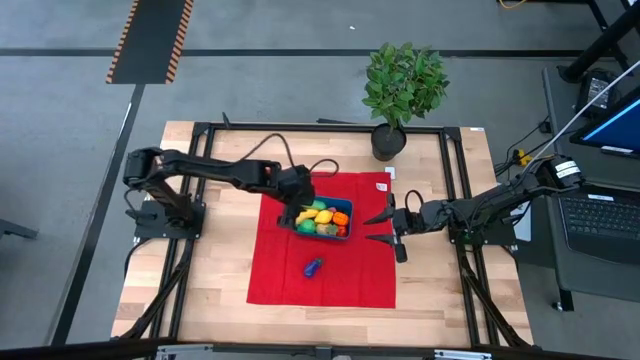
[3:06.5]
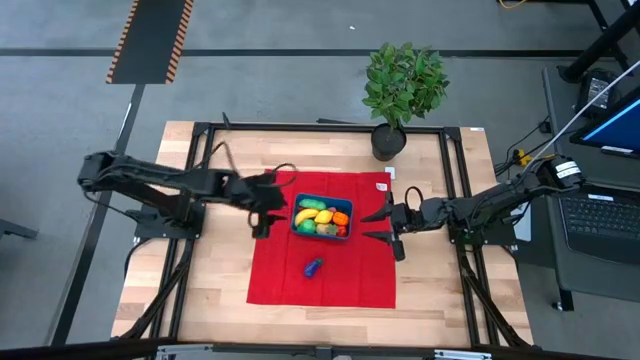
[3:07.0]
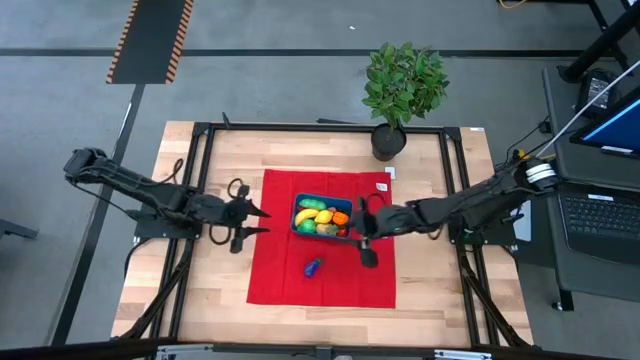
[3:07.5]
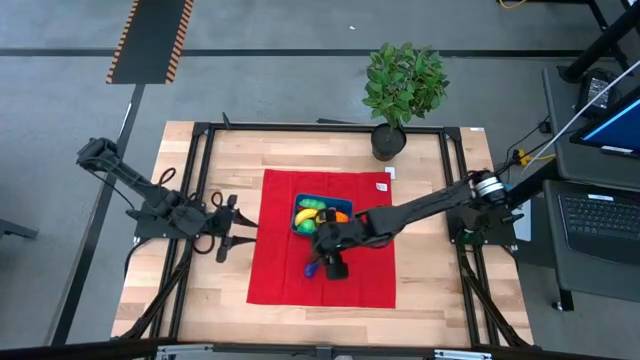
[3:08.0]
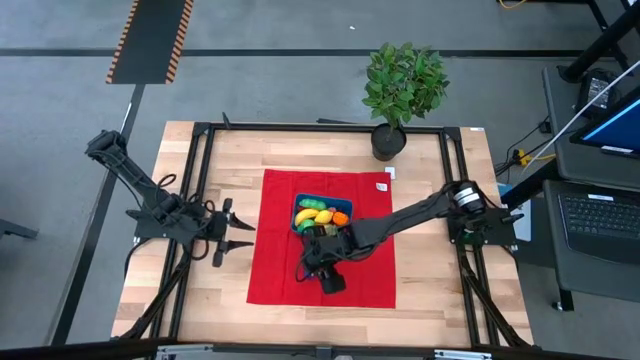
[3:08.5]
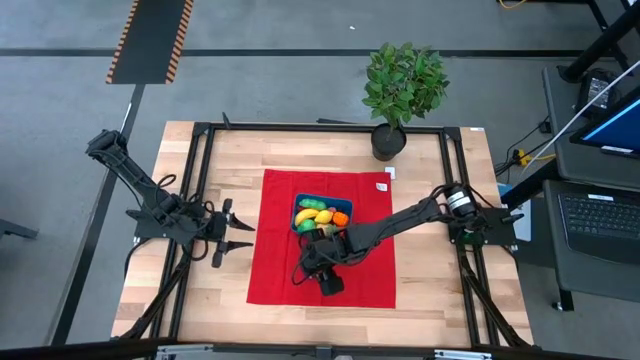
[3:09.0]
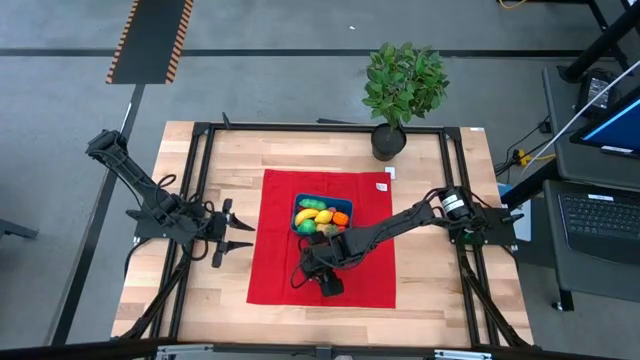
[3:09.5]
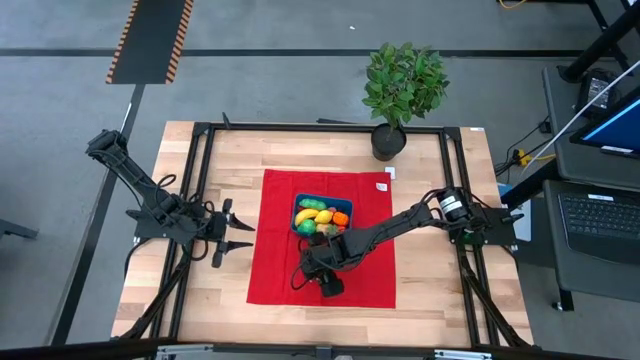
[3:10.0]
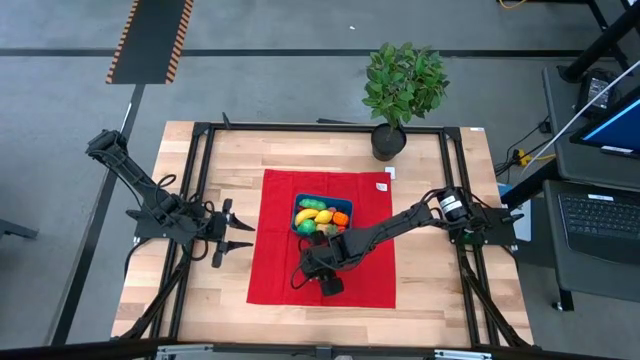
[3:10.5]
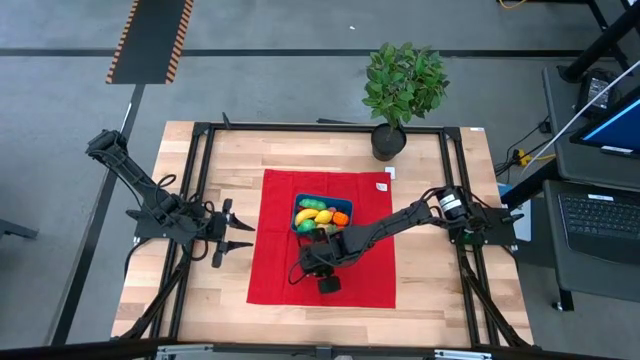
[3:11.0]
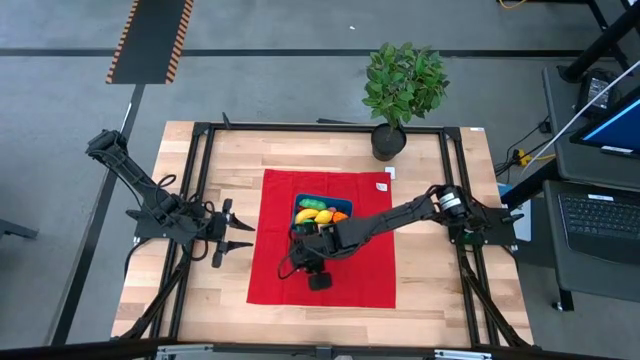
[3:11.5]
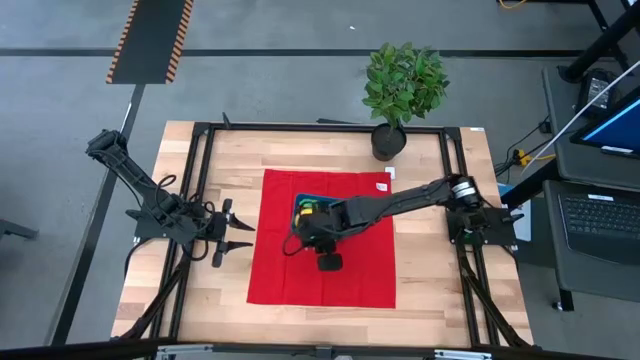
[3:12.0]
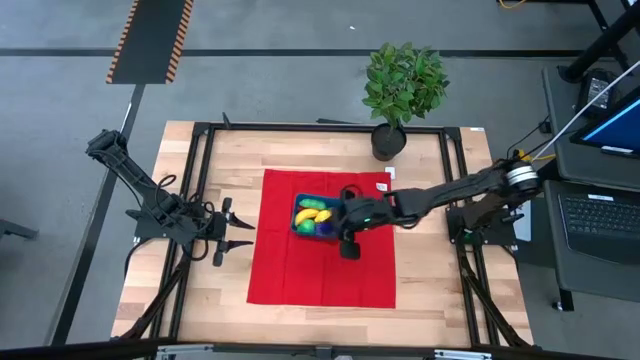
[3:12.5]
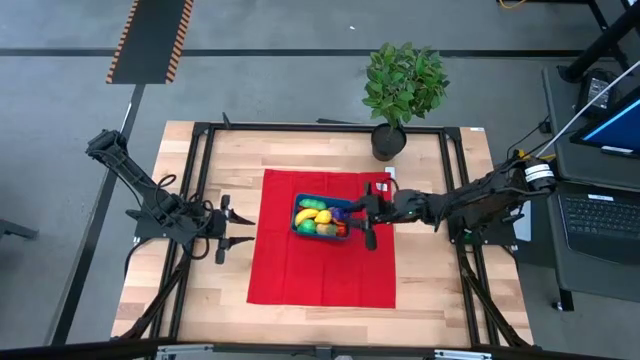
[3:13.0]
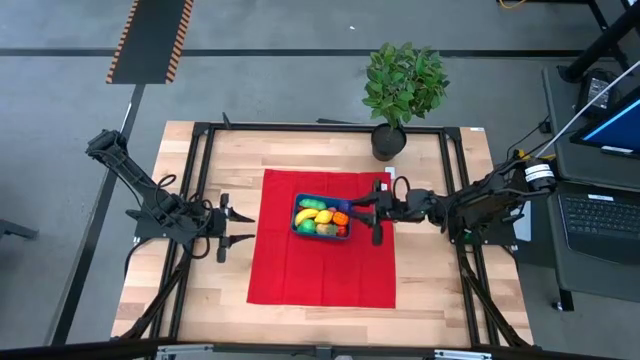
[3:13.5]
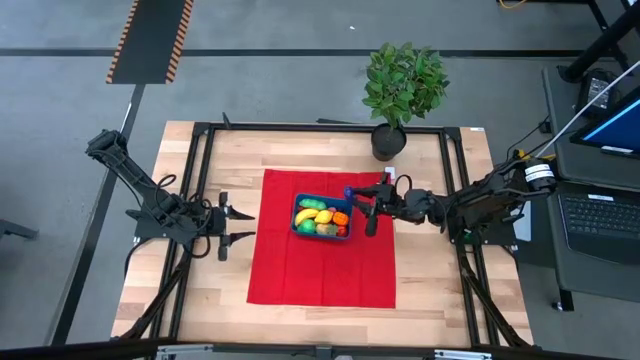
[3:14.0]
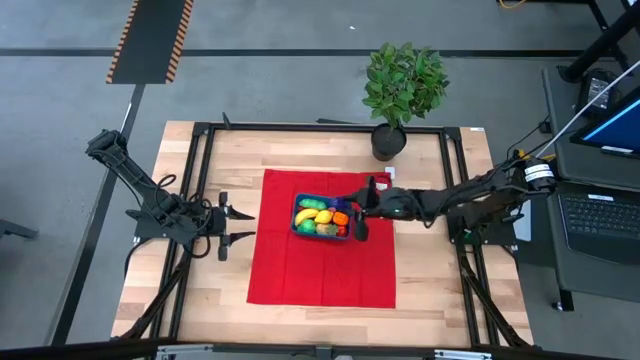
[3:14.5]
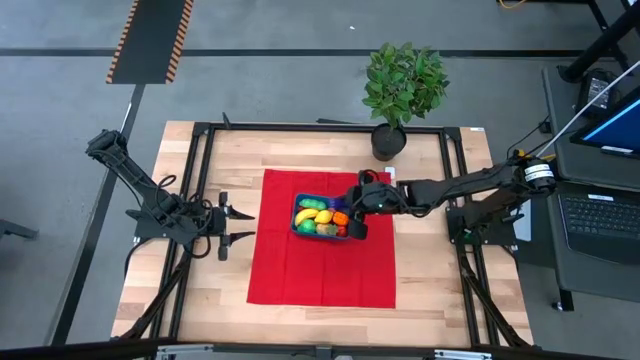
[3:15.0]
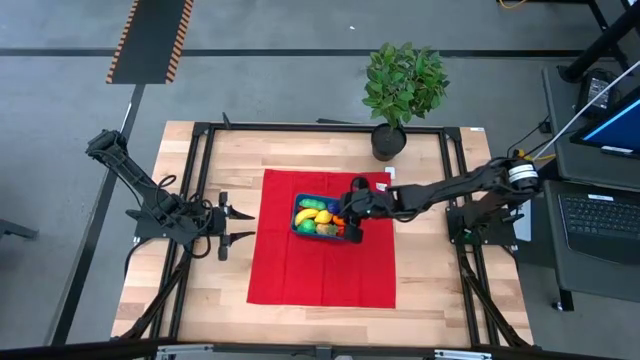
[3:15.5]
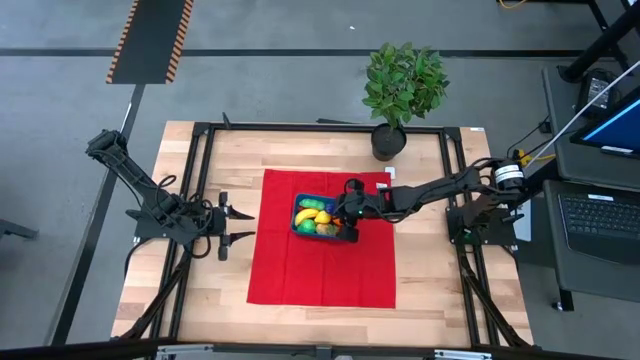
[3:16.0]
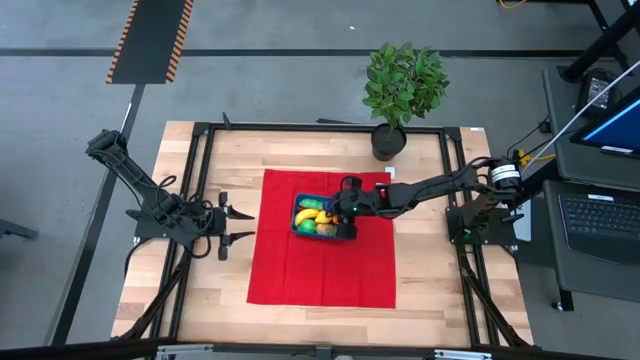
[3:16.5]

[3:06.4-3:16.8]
Task: Pick and placing Produce into tupperware
Put the purple eggplant into the blue bin

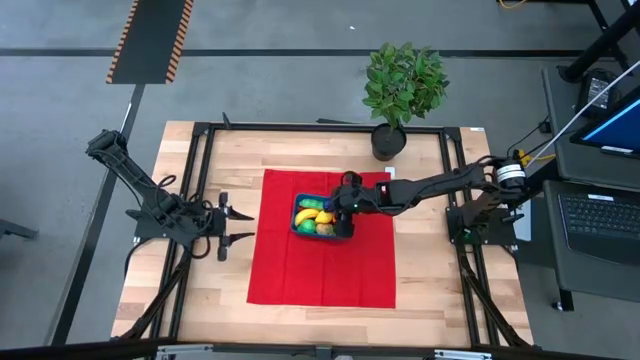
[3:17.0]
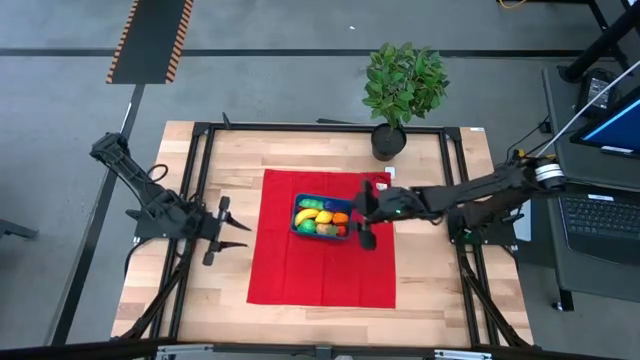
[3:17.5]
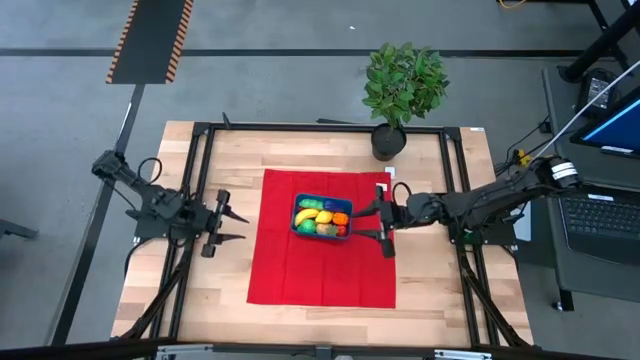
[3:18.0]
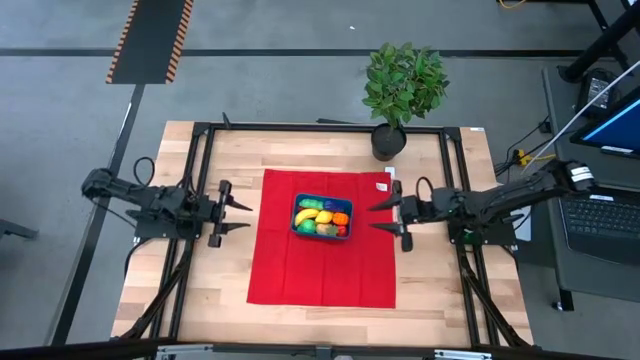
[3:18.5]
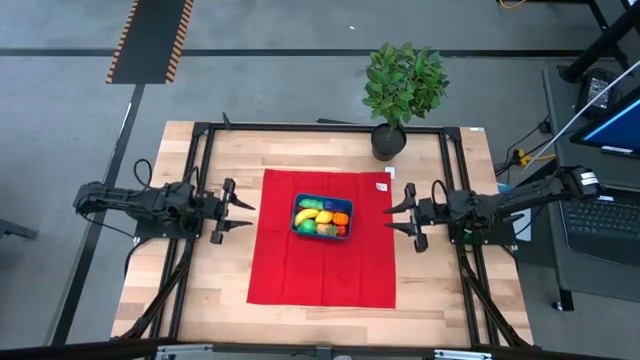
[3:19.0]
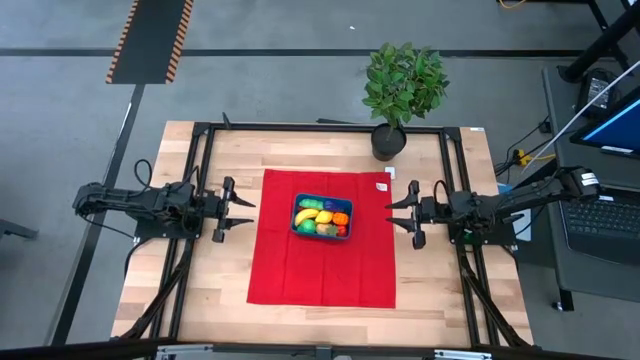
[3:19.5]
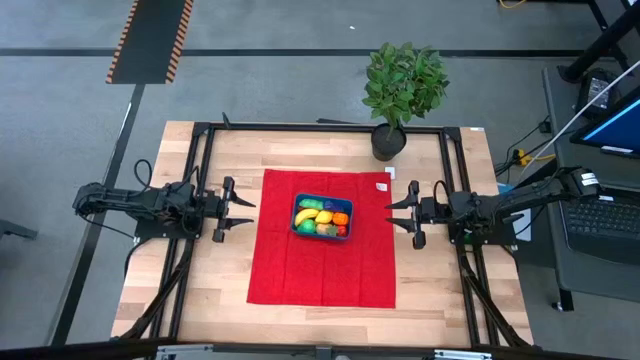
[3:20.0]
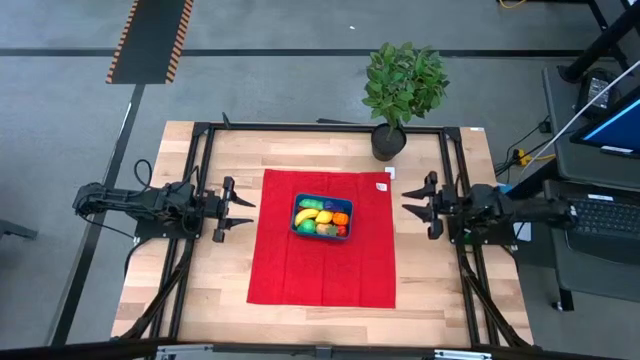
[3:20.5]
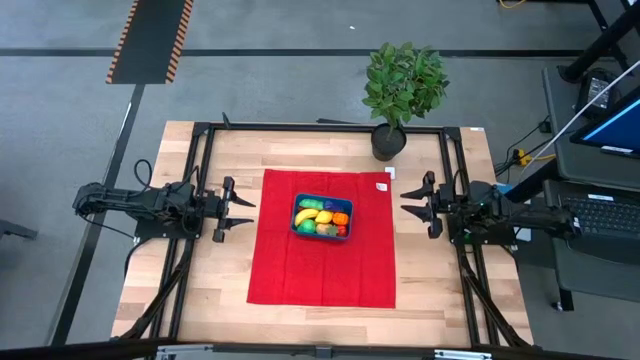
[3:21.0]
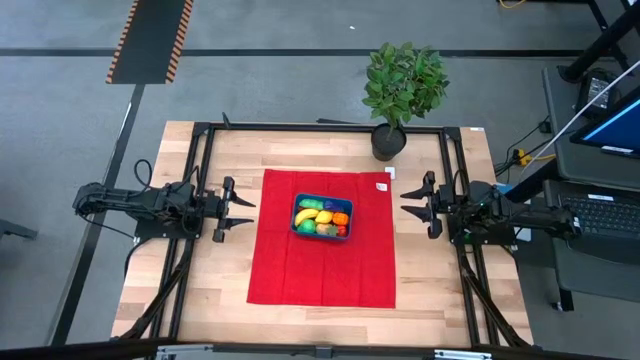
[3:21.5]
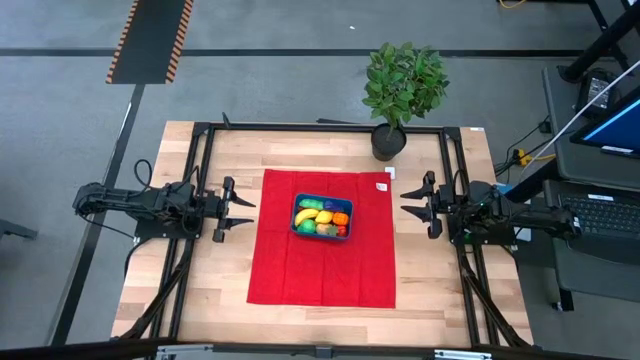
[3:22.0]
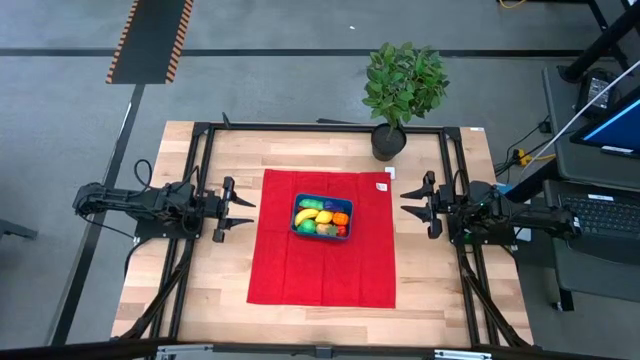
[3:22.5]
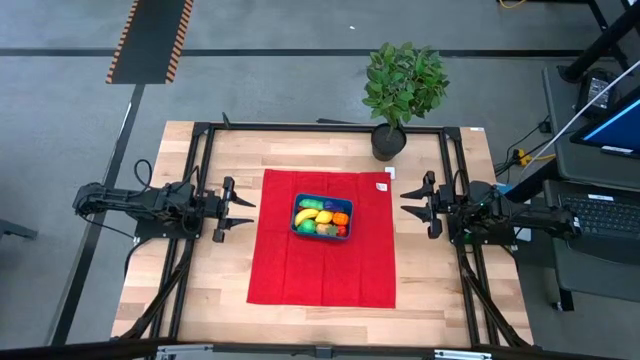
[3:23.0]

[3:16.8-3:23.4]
Return to Home Position

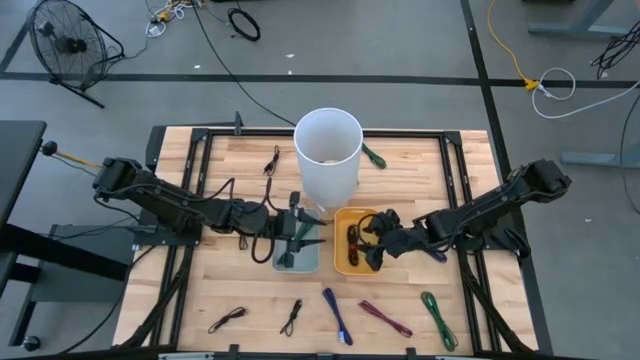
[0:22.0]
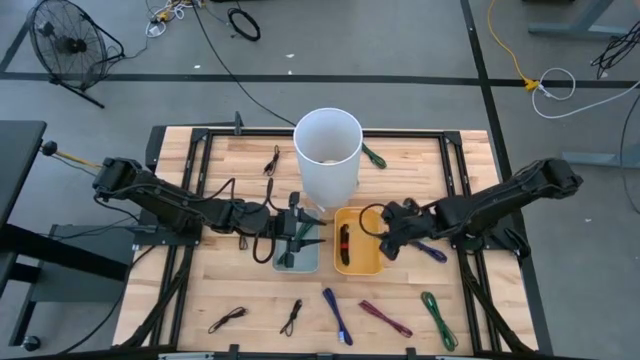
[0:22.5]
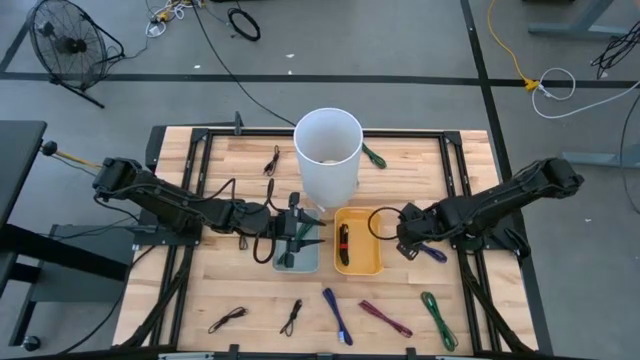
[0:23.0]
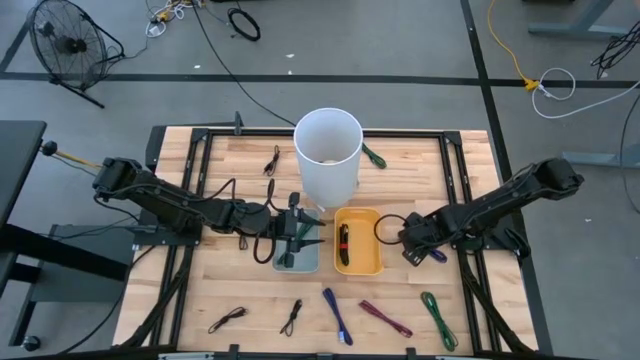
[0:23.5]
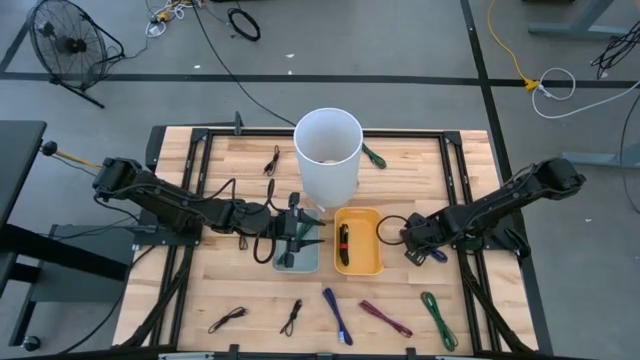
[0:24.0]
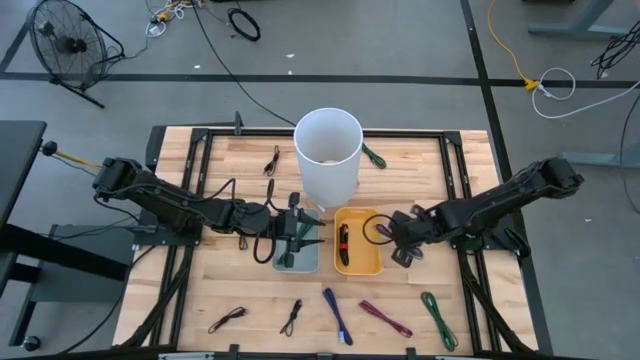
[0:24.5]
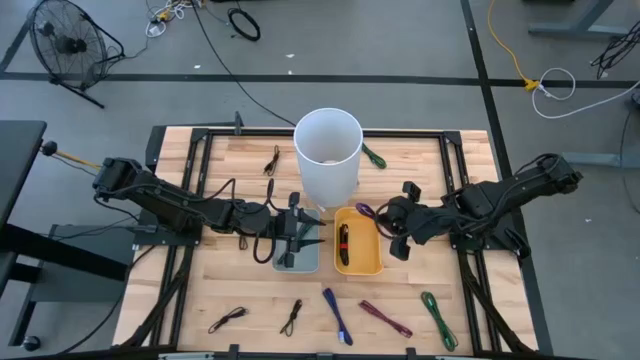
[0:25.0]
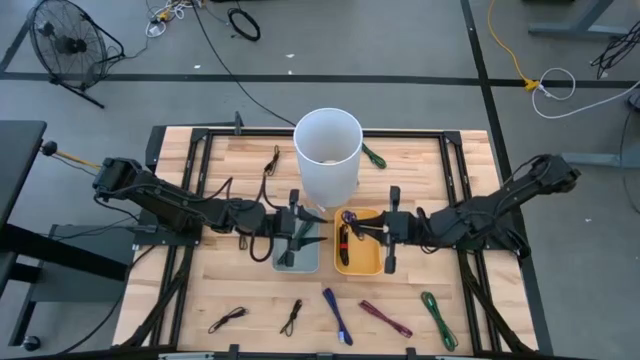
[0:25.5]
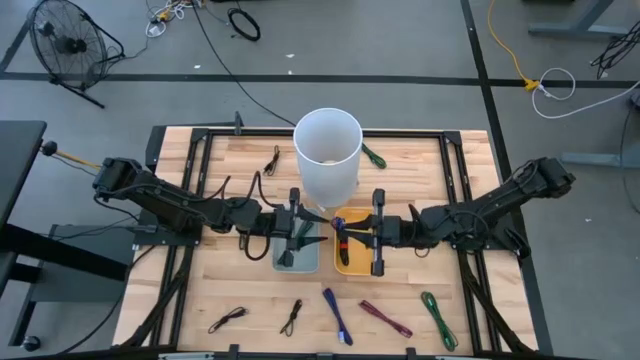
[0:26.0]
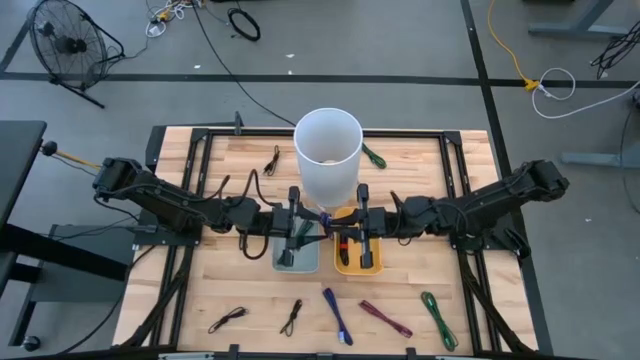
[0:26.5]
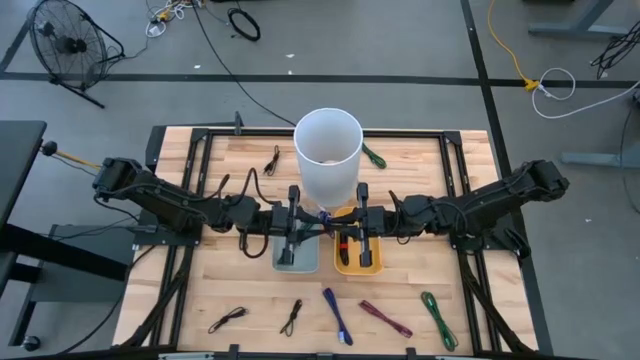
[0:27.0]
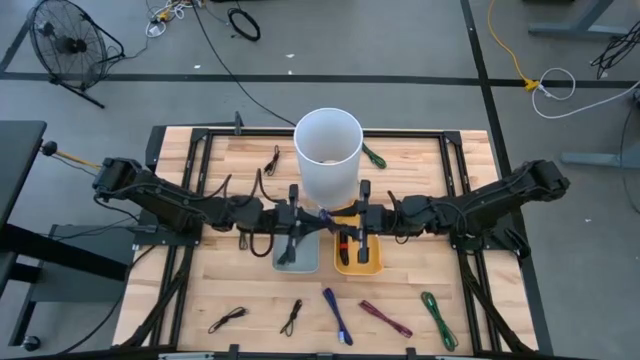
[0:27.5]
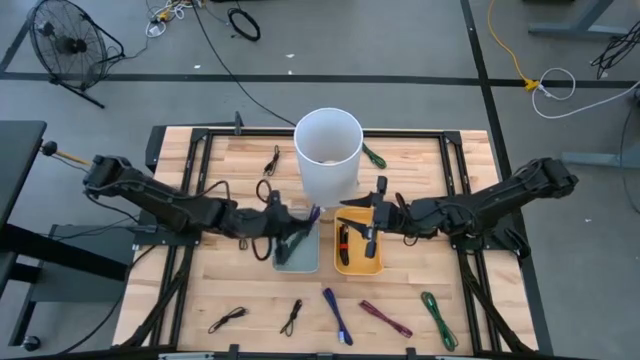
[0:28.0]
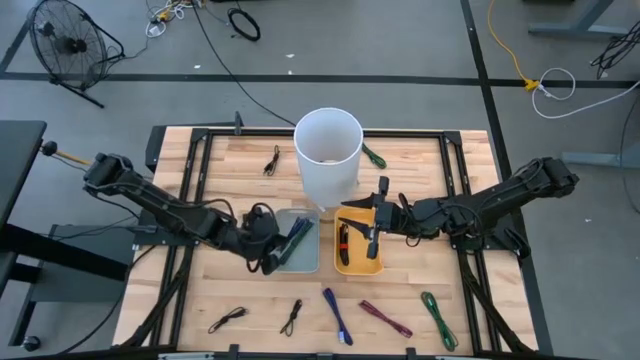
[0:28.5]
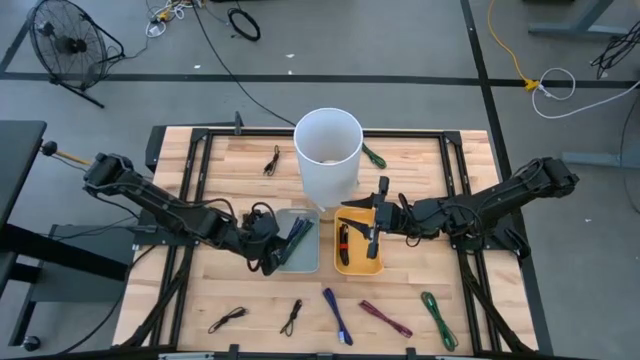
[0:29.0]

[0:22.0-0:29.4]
Task: Pick & Place USB Port
Put the blue charger cable into the gray bin
